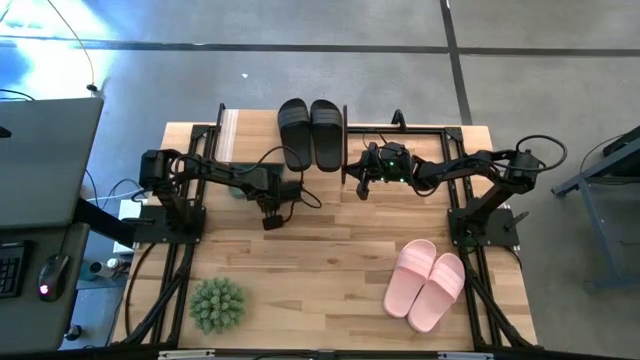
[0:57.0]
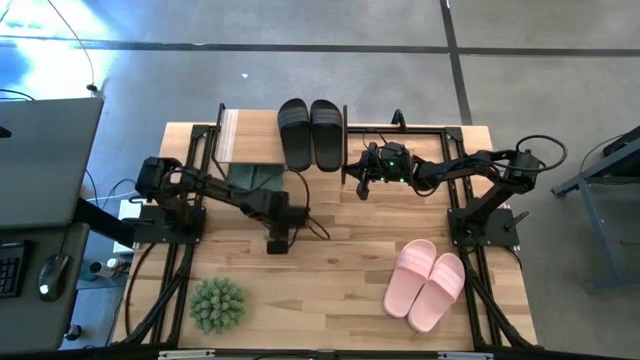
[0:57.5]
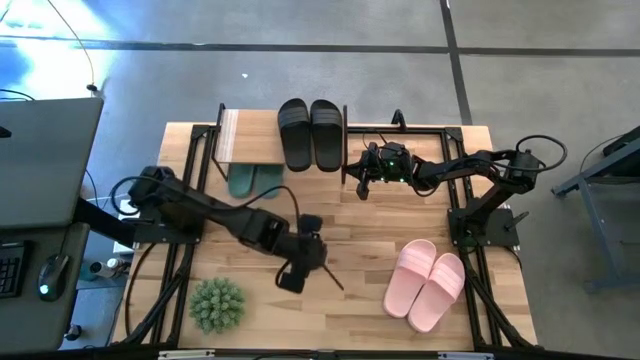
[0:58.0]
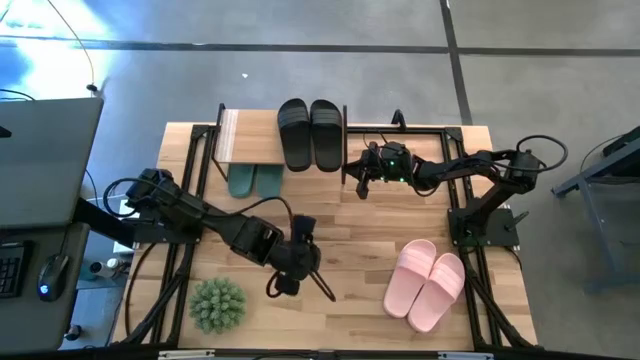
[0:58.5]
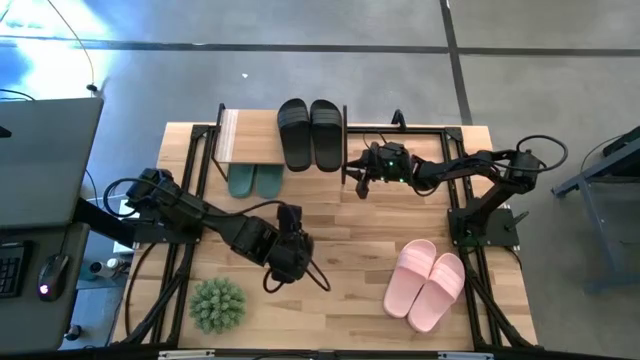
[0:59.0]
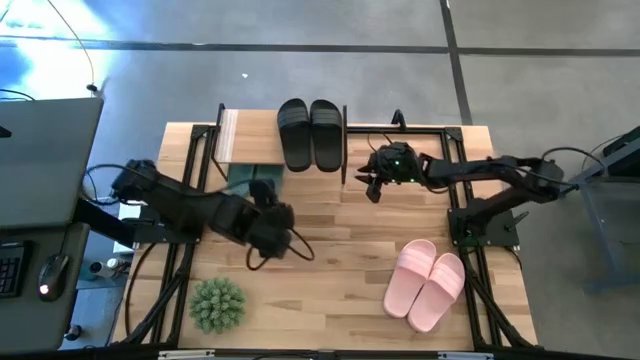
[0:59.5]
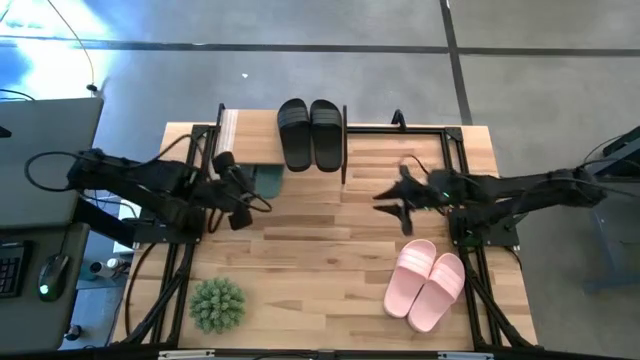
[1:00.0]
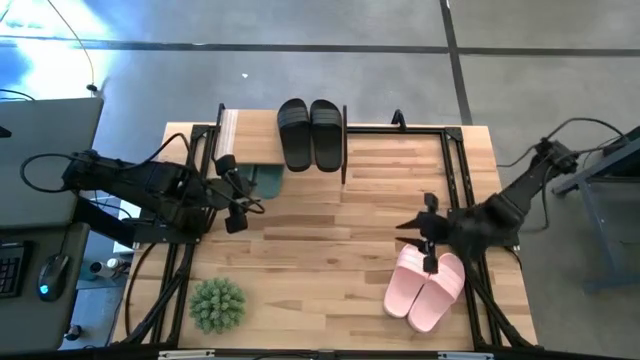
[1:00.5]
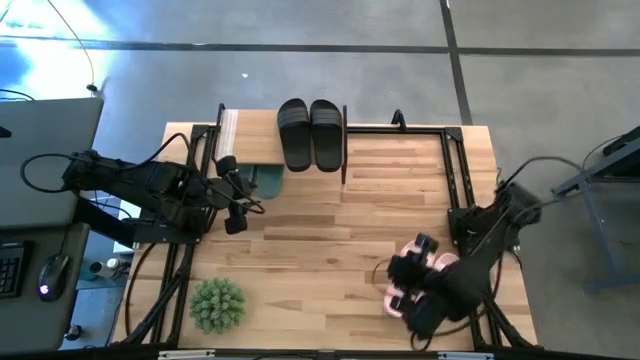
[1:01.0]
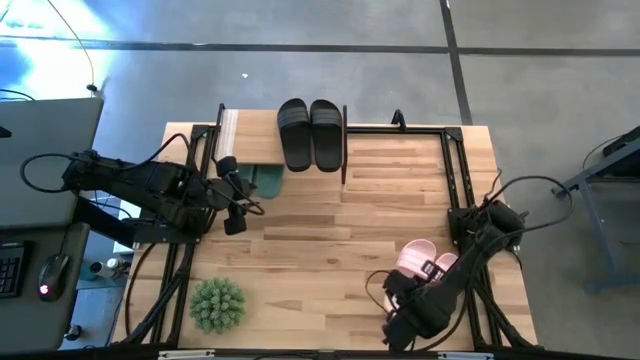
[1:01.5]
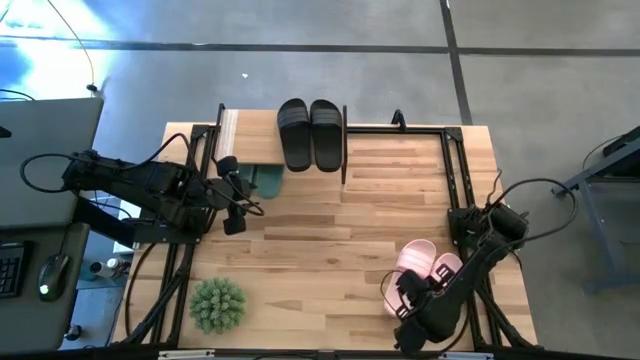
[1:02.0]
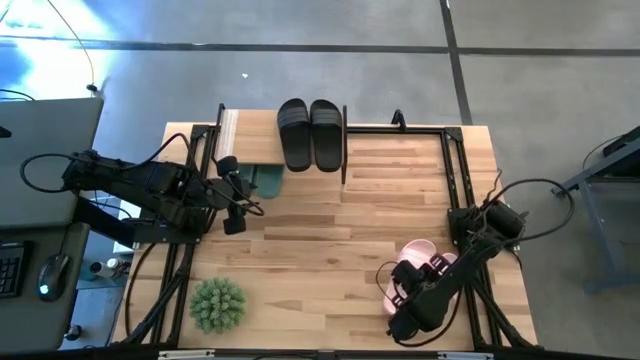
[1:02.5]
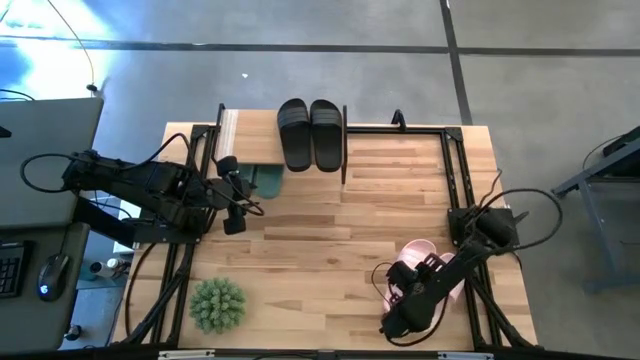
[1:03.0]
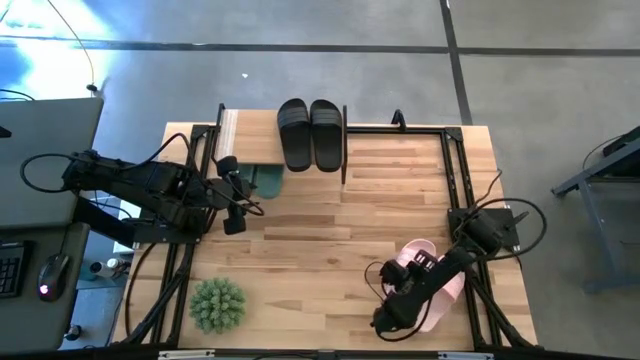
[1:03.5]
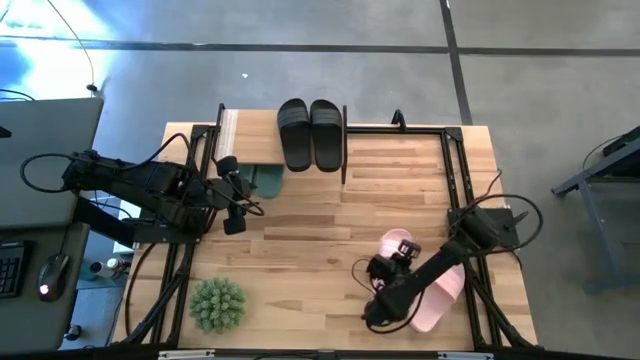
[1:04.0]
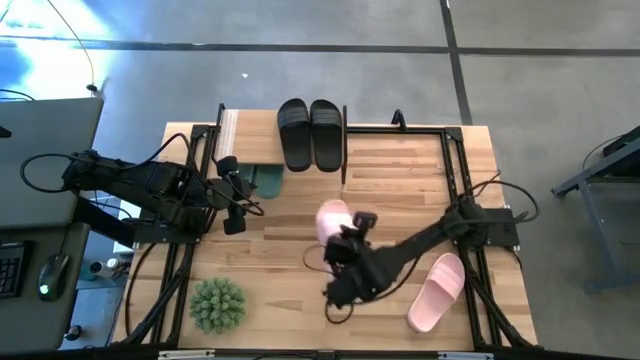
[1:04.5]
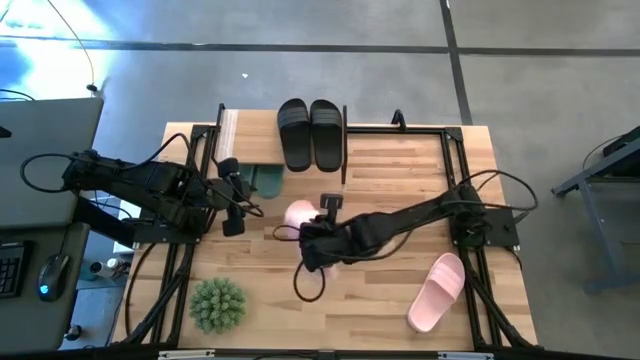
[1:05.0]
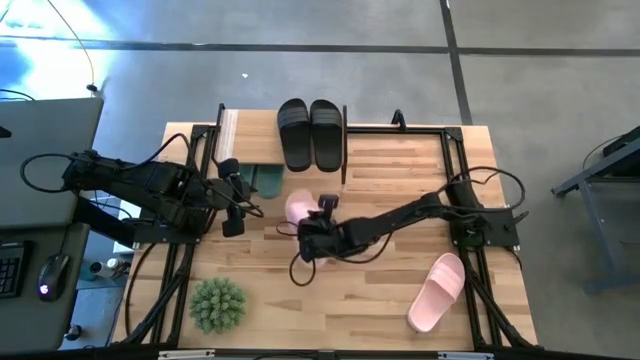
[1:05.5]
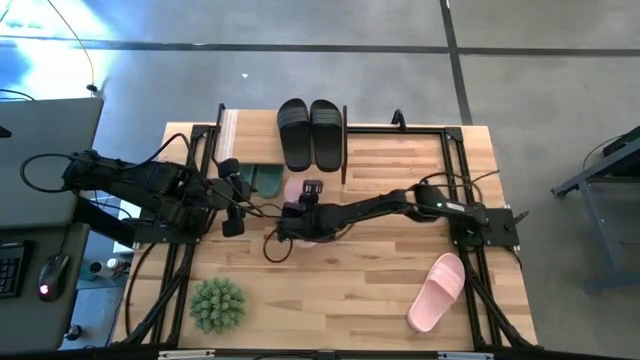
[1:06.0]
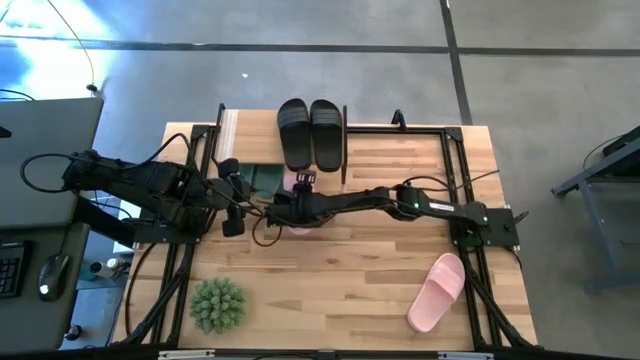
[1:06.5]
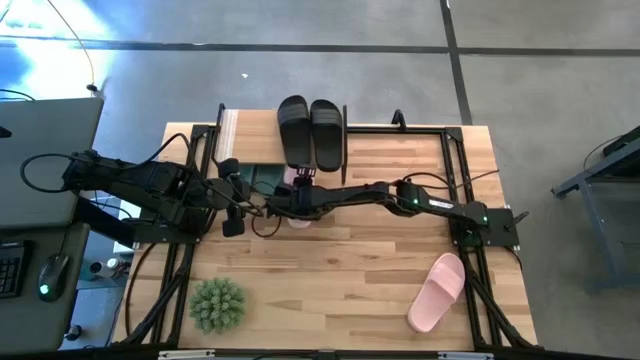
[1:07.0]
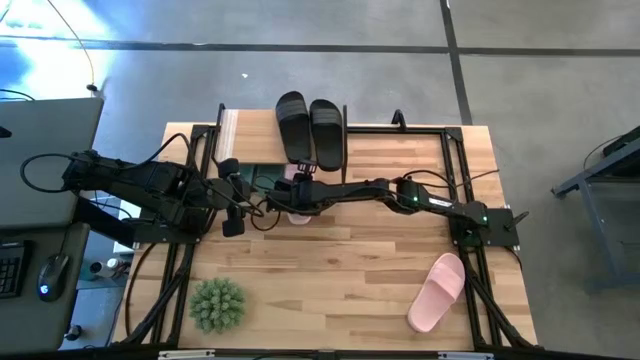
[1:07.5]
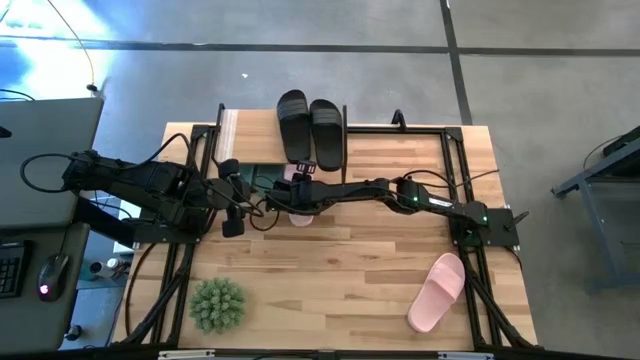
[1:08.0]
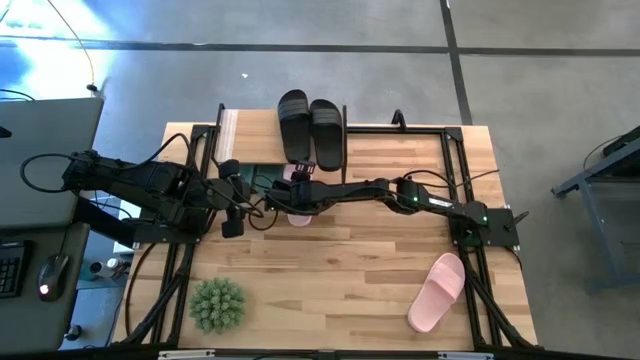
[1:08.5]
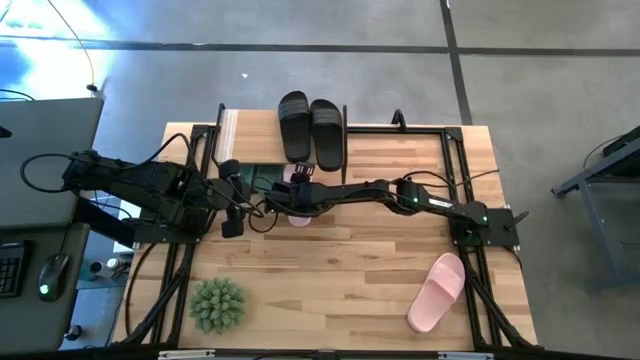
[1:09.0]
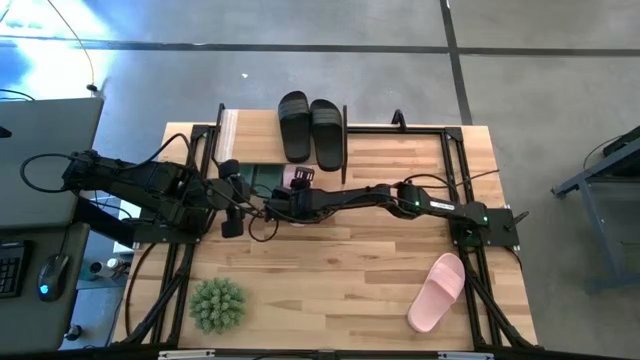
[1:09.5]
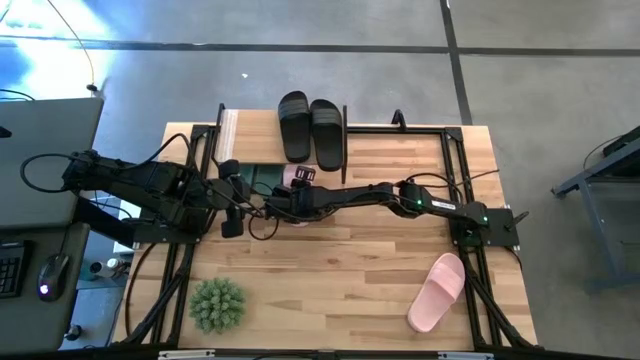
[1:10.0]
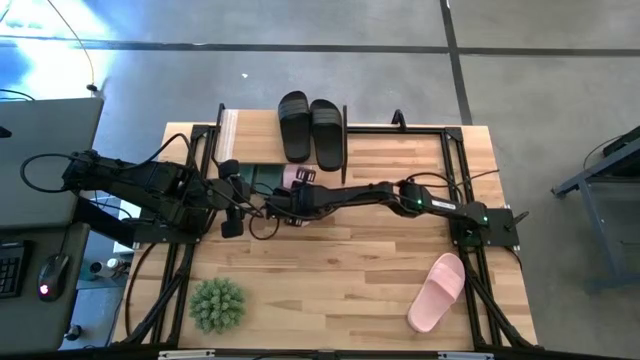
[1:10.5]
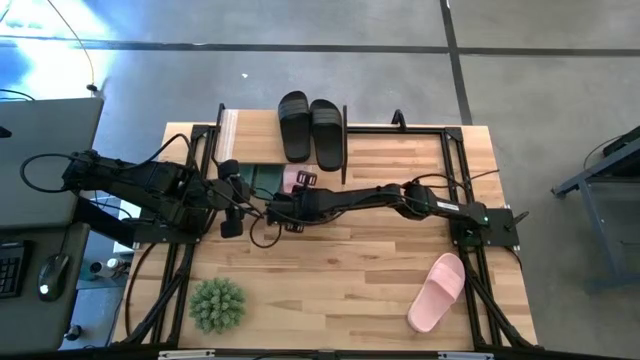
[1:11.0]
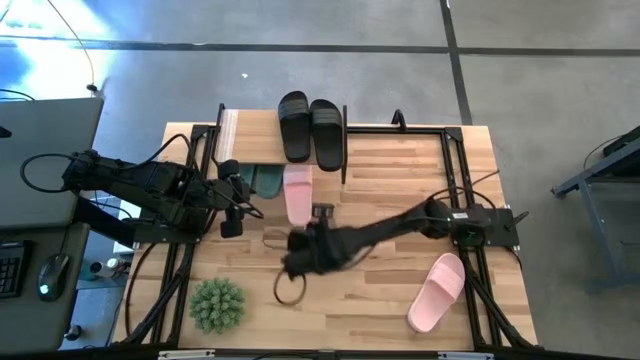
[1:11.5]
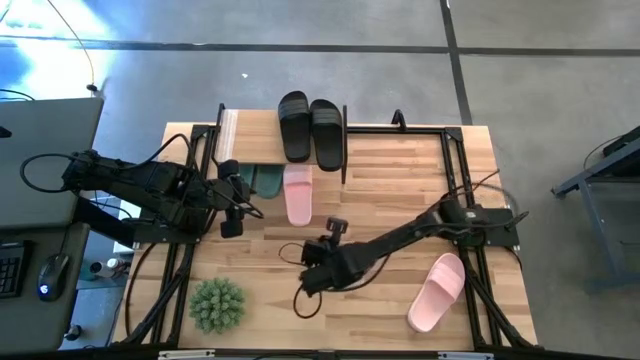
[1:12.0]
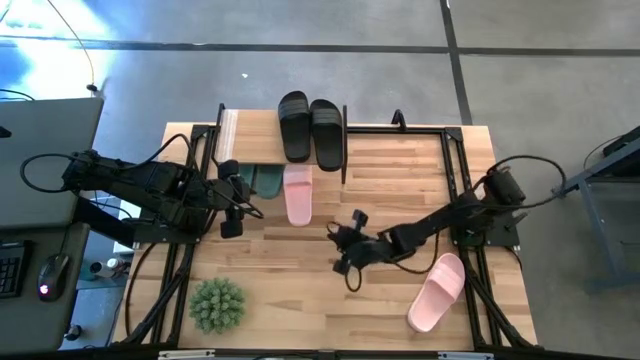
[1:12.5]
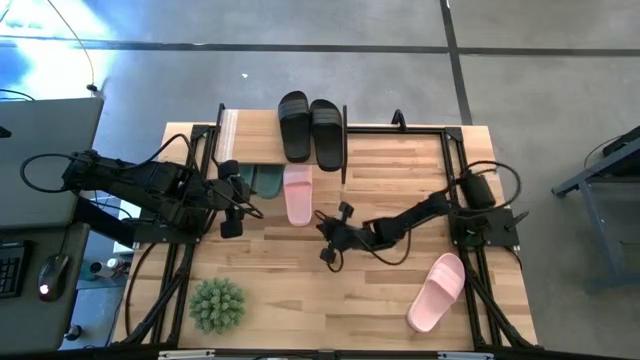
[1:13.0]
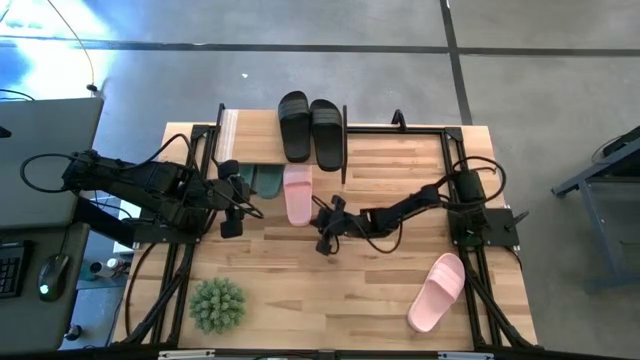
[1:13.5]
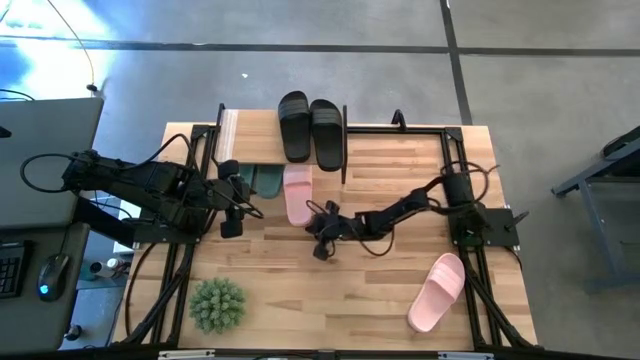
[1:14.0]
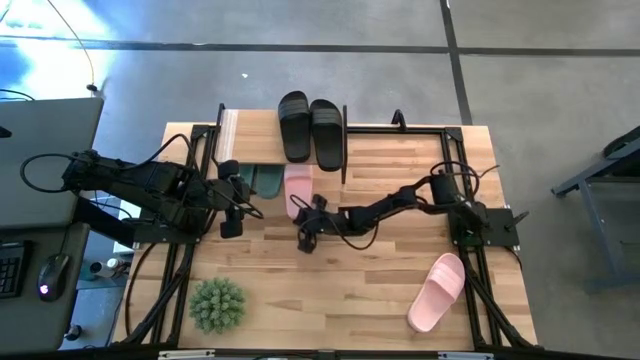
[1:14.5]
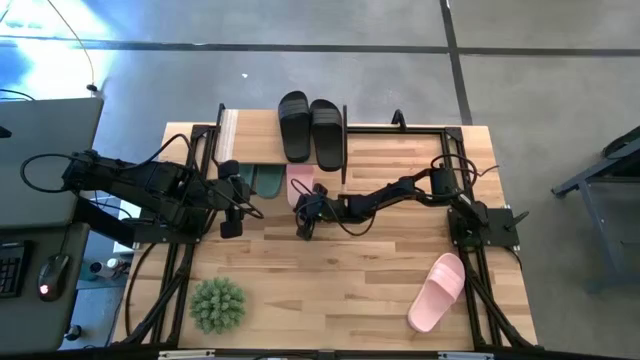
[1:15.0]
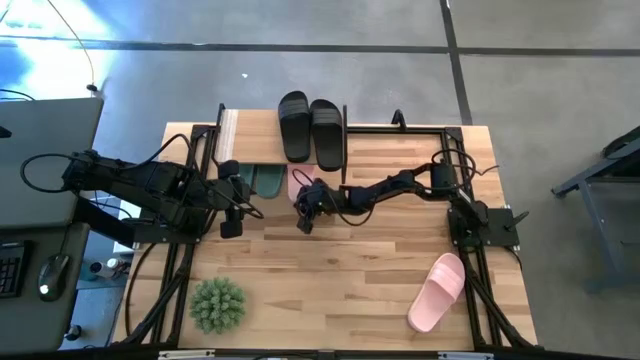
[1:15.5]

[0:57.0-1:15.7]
Task: Pick and place slides into the shelf
Put the left pink slide under the shelf
